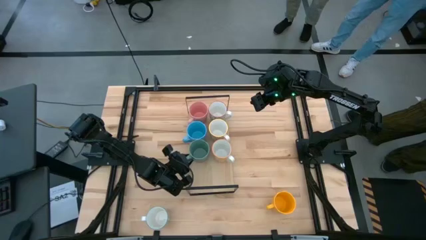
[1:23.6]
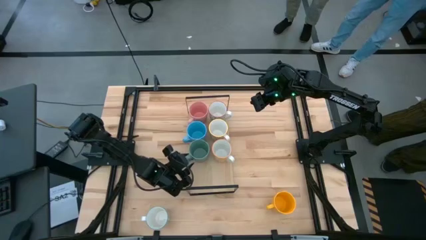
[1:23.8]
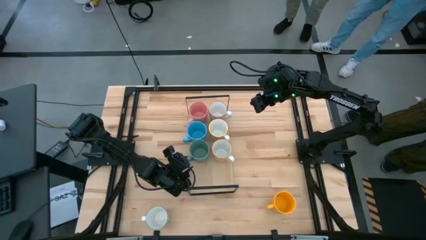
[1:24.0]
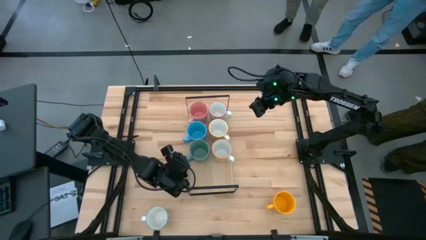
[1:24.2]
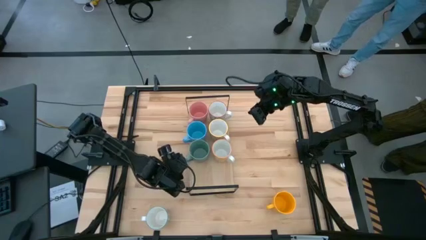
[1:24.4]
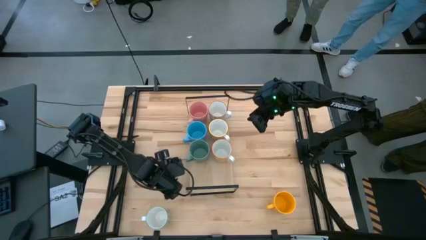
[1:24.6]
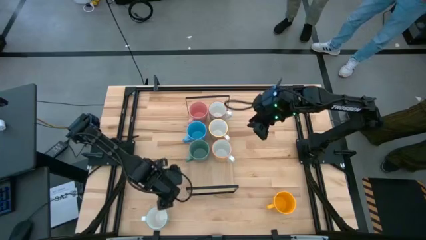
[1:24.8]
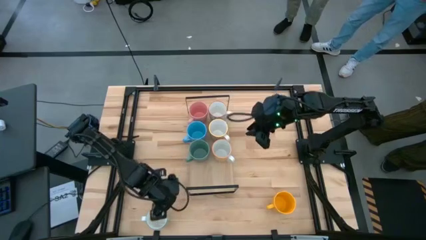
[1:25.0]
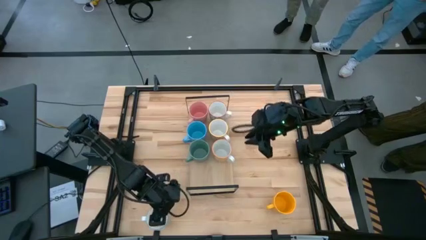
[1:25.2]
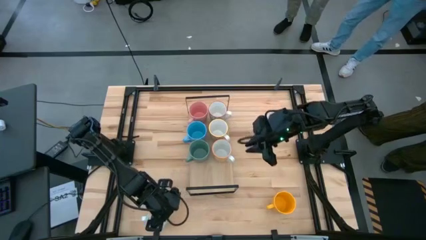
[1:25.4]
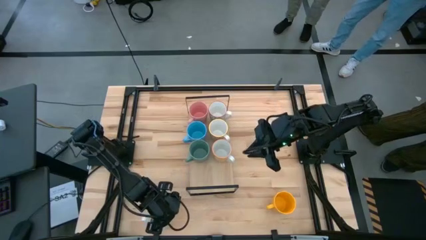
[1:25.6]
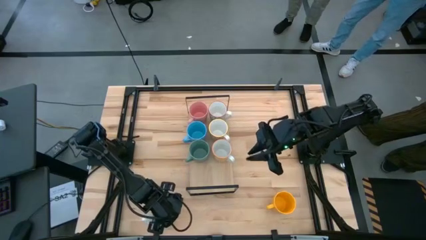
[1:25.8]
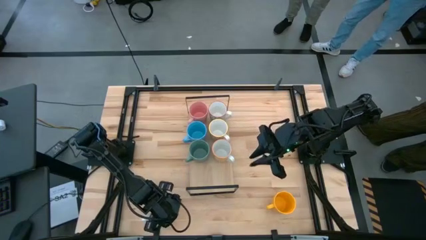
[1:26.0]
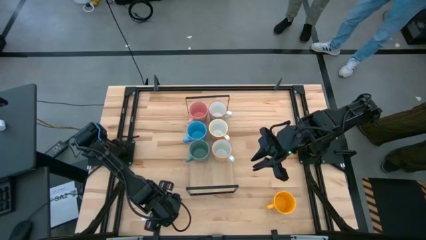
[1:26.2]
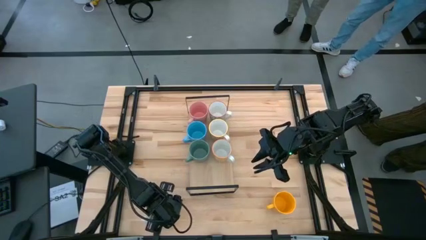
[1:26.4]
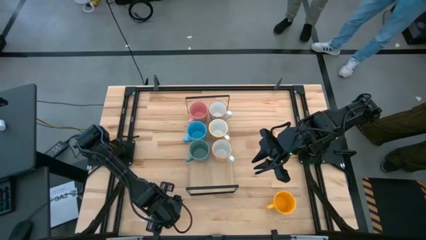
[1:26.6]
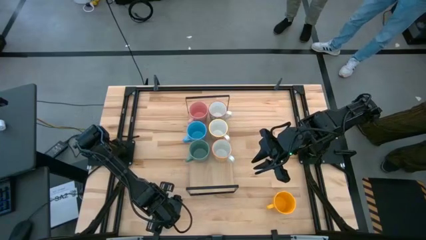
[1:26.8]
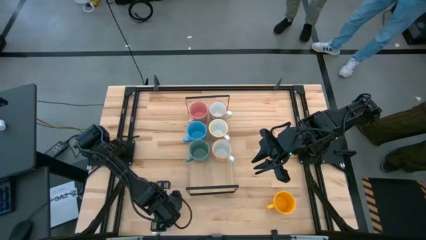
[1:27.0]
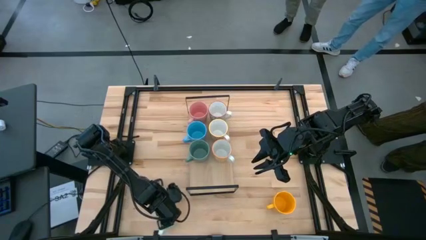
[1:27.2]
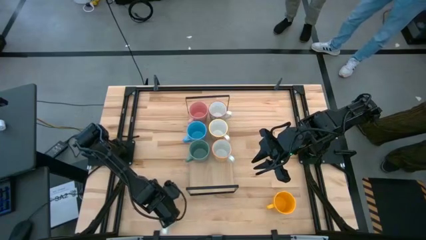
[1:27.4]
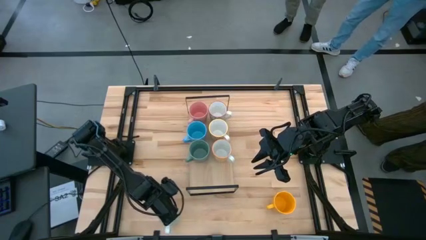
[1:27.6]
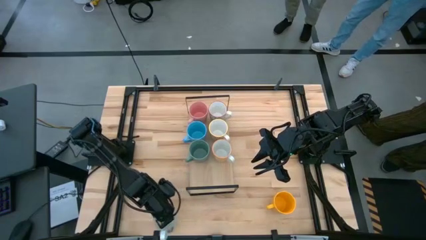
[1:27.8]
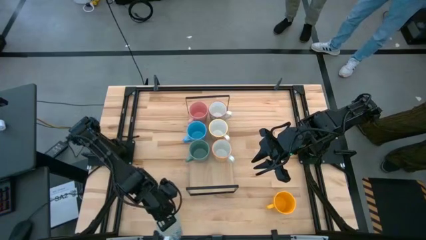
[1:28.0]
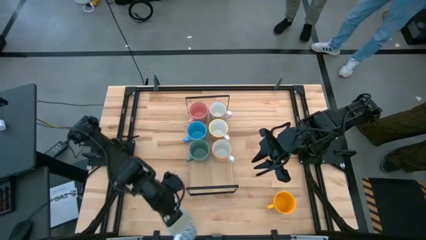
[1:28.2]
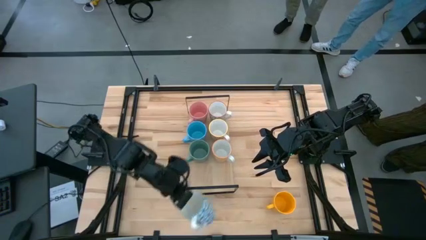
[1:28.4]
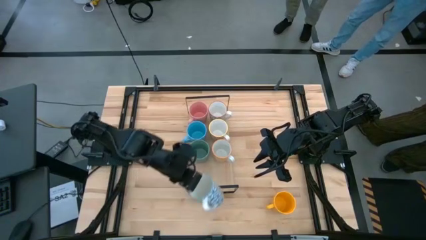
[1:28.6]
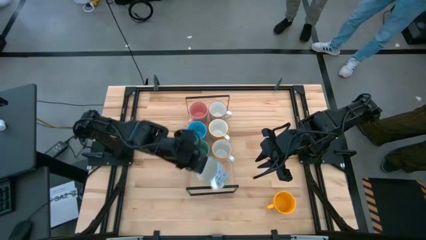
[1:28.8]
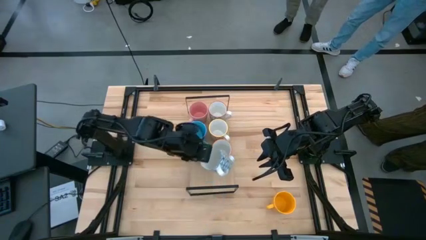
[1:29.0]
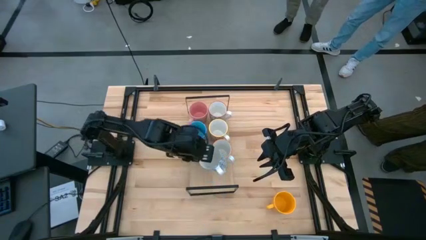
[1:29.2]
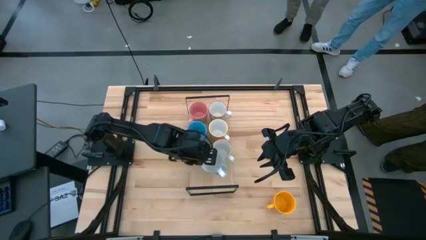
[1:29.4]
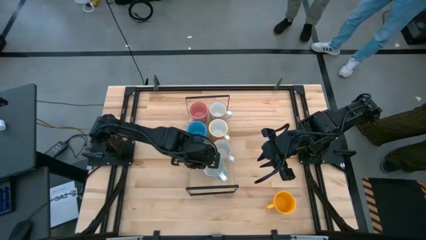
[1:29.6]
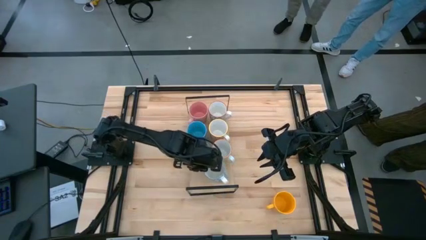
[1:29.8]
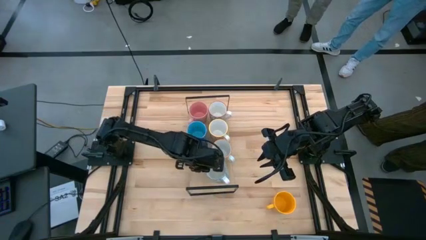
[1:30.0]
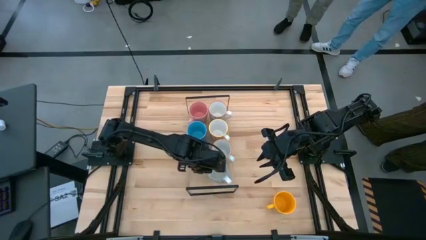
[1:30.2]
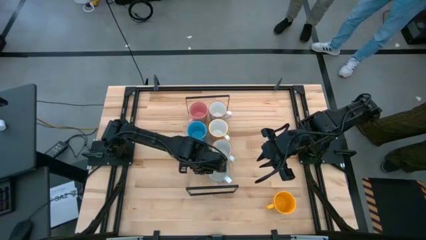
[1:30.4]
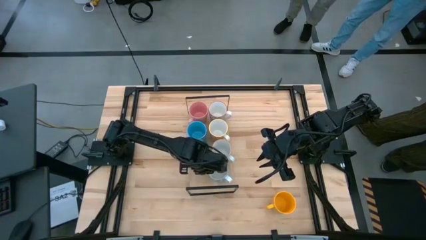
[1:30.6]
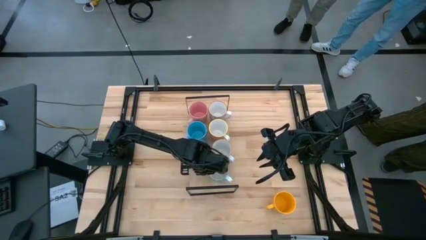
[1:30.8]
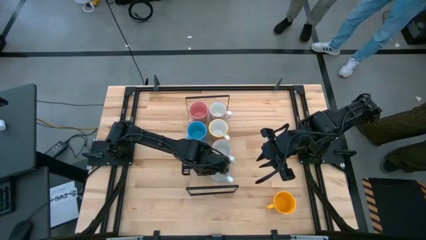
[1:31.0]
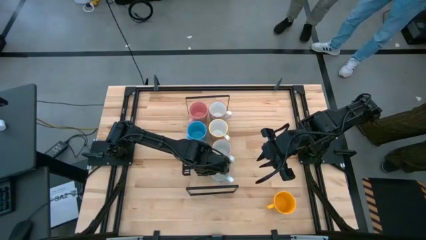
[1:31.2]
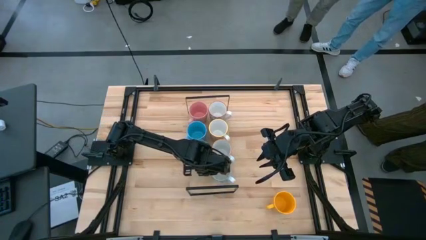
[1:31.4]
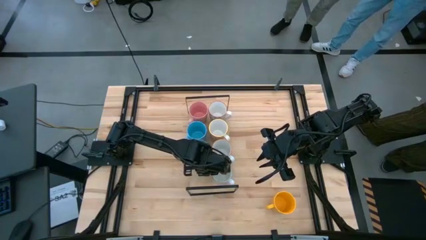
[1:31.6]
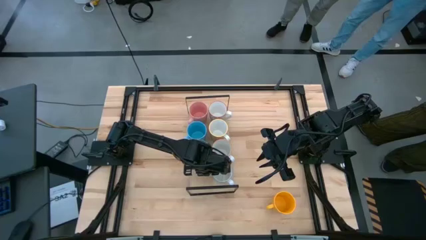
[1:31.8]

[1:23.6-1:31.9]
Task: Place coffee mugs
Put the blue patterned mug on the shelf

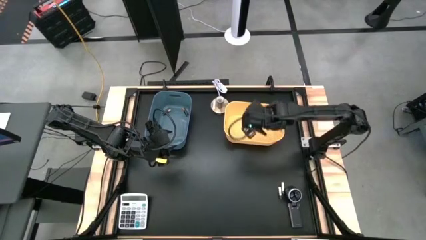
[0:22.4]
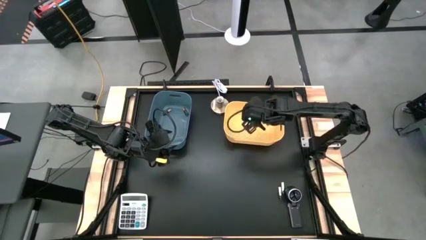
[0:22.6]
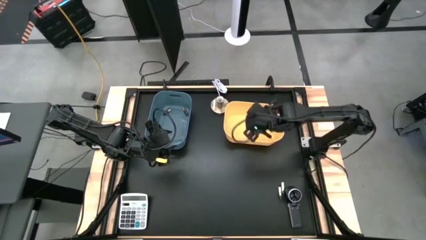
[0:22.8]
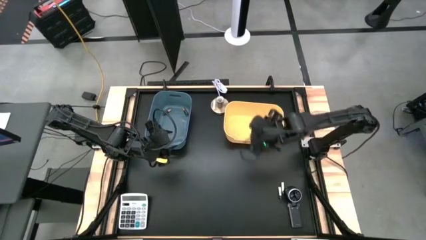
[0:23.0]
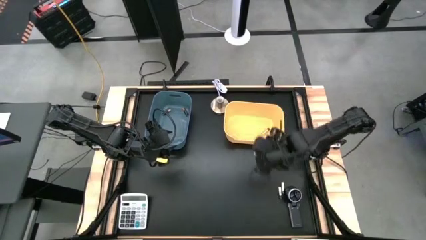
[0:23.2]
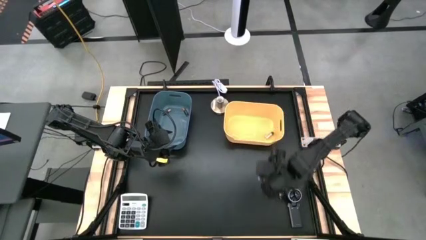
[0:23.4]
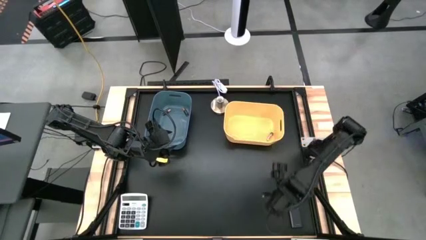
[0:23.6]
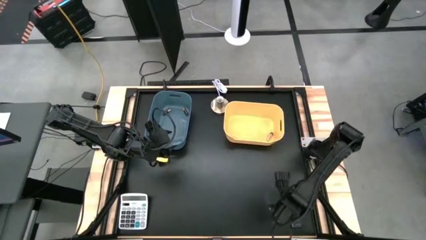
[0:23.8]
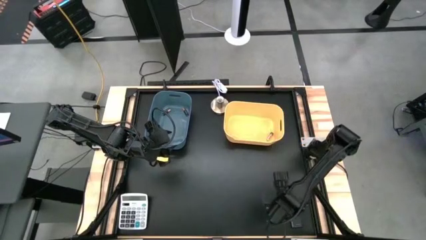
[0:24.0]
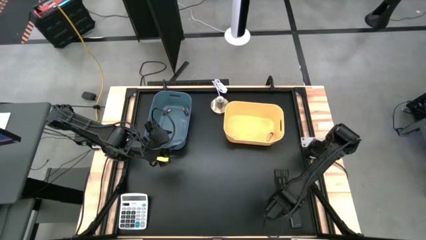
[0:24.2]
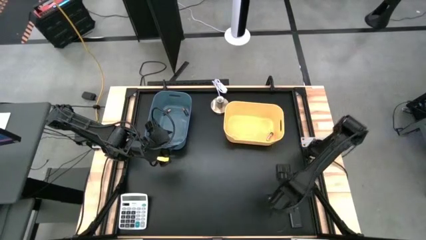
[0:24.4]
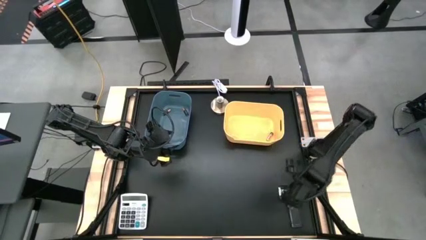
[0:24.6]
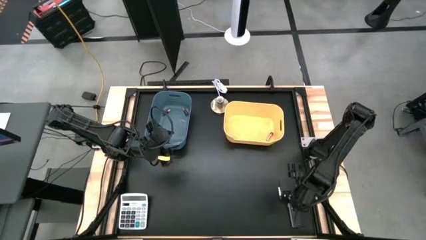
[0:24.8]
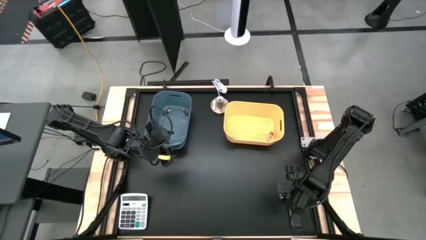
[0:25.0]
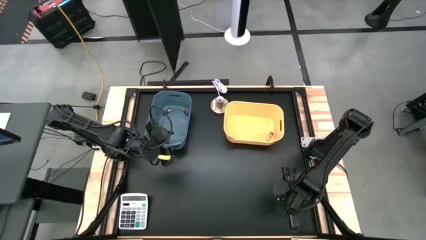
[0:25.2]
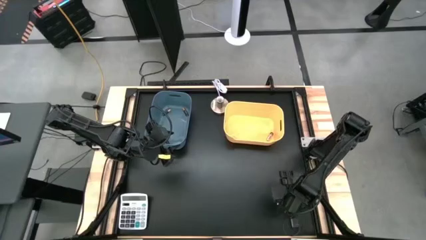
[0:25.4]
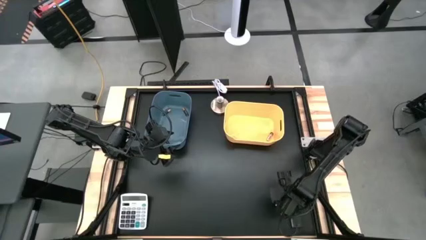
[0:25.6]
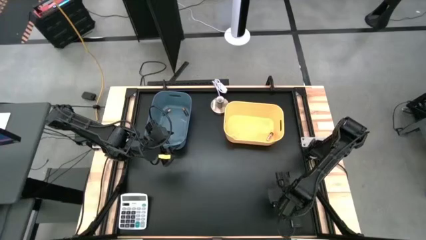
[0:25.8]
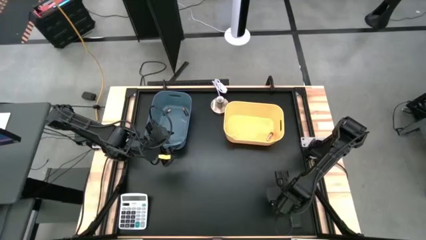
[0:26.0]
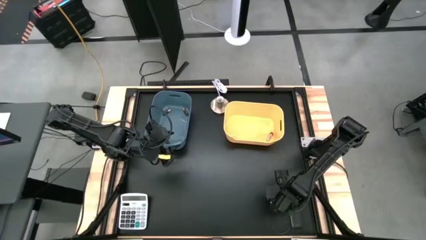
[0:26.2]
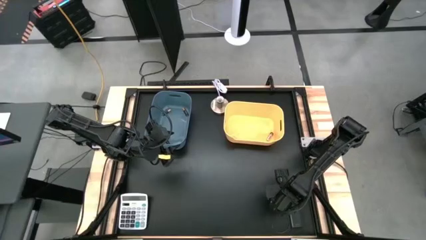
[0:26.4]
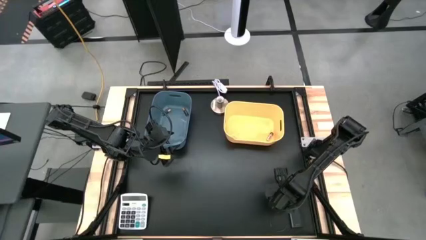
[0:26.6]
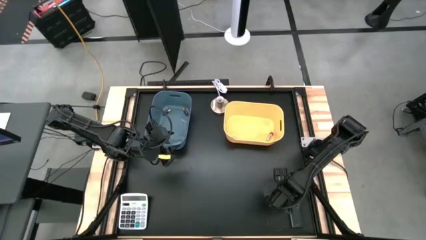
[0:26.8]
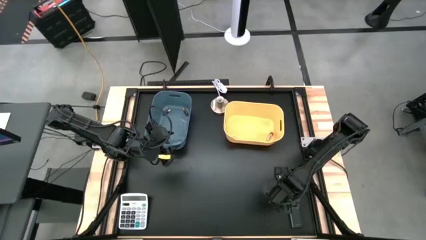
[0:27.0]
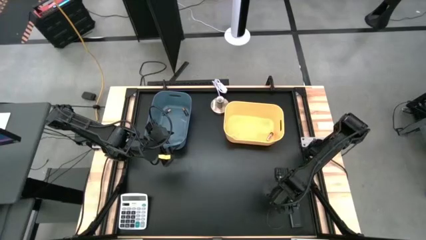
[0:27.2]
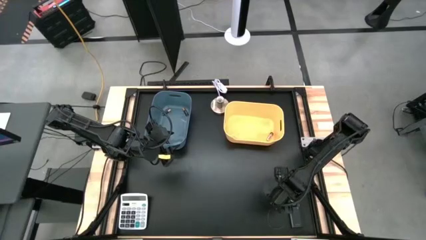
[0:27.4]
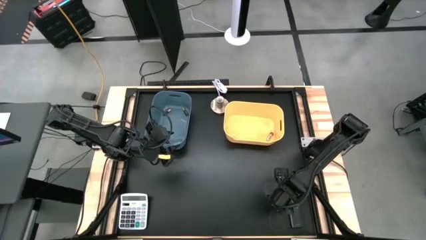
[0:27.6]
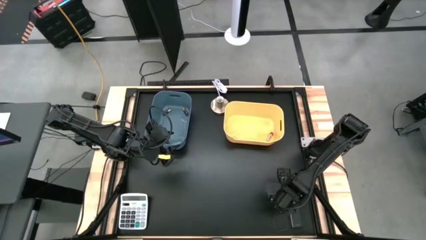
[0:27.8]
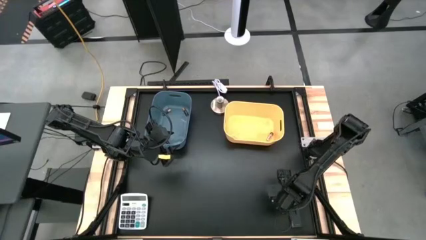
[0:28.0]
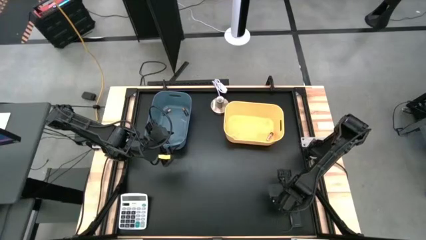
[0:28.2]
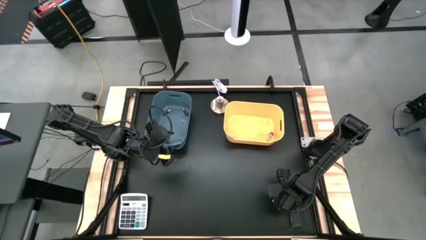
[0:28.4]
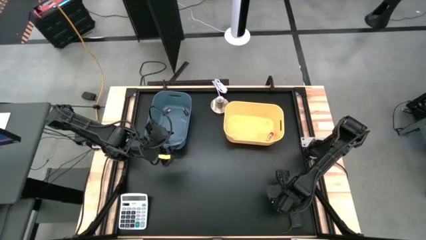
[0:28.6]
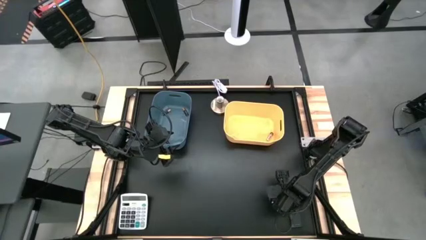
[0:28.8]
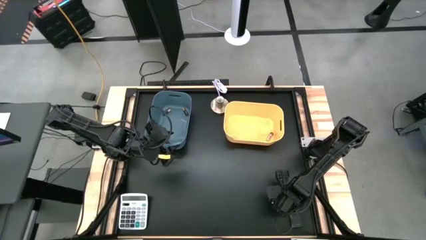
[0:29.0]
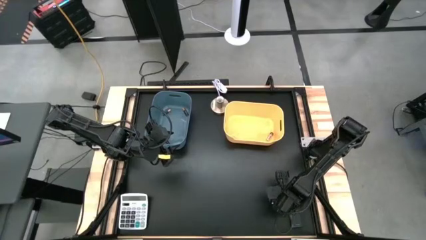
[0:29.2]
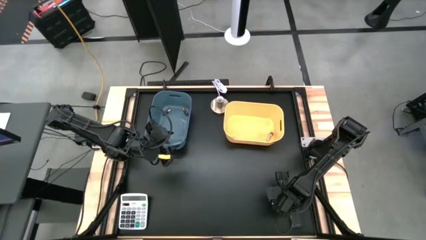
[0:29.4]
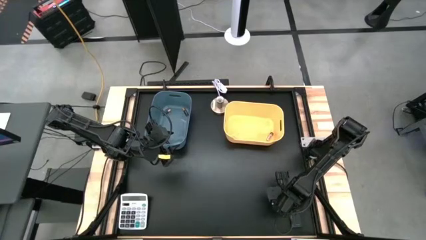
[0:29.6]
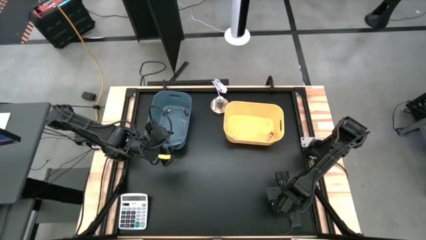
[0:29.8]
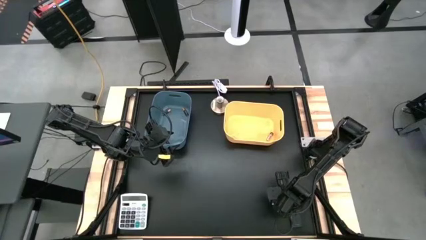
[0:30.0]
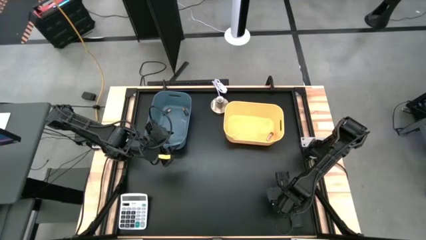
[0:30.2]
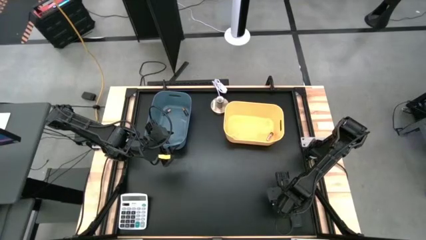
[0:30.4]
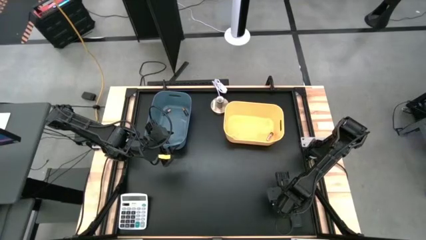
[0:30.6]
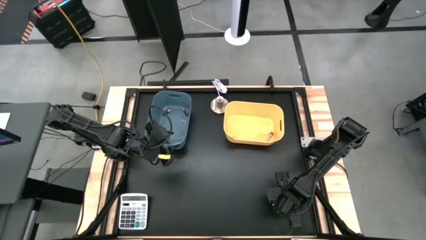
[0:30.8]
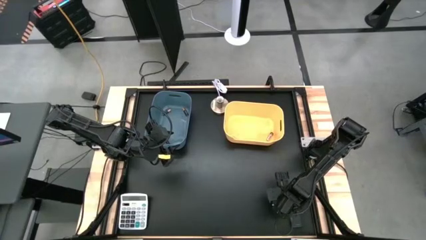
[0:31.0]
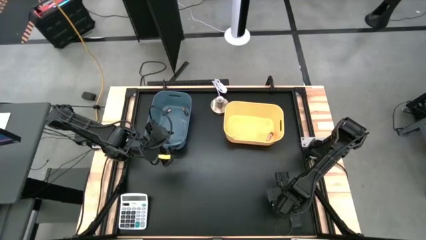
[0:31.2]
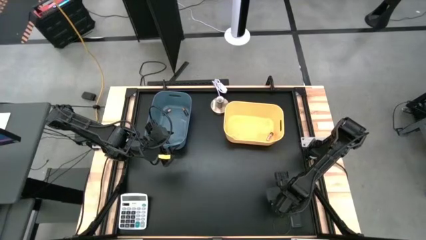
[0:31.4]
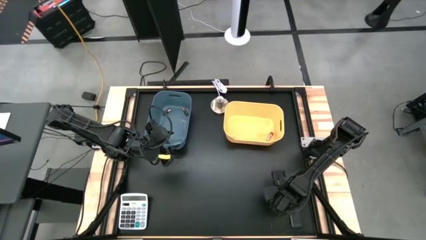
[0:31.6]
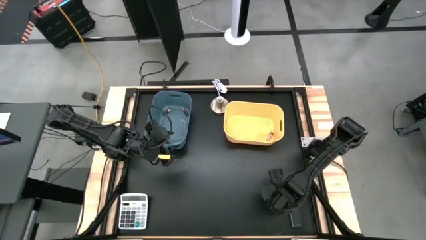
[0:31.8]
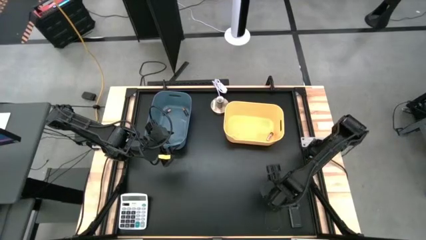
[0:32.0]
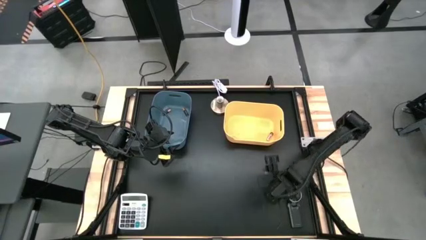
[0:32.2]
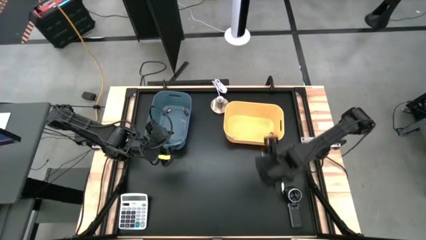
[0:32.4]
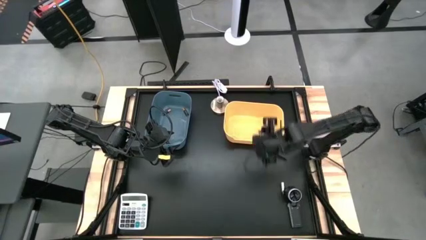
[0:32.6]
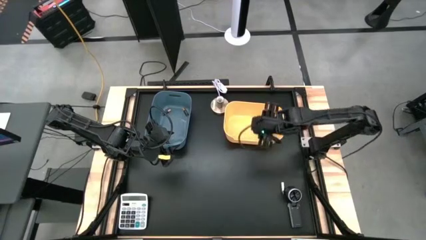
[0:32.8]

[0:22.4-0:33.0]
Task: Sort batteries
Put the left silver battery into the yellow bin
